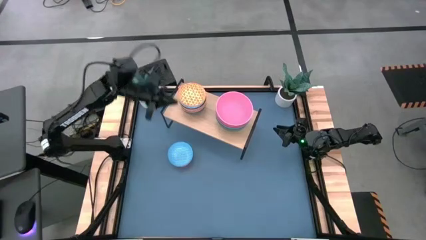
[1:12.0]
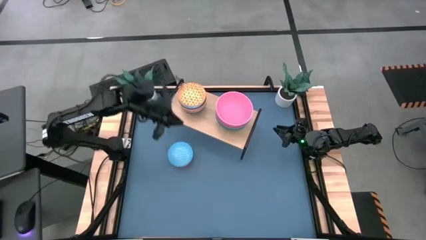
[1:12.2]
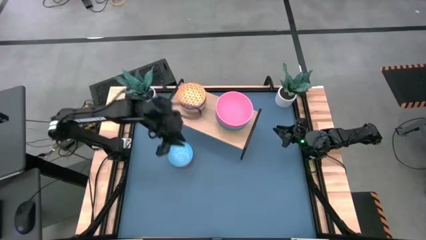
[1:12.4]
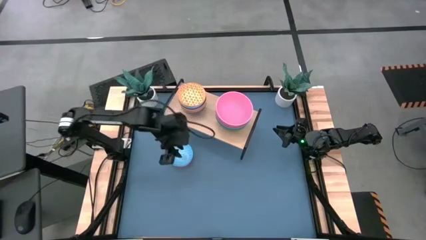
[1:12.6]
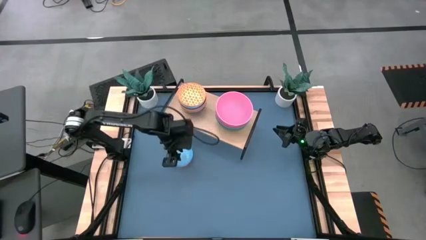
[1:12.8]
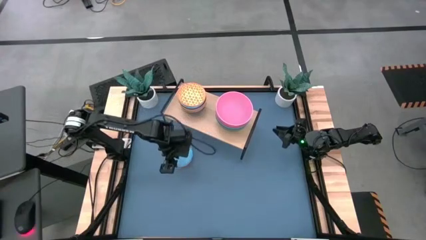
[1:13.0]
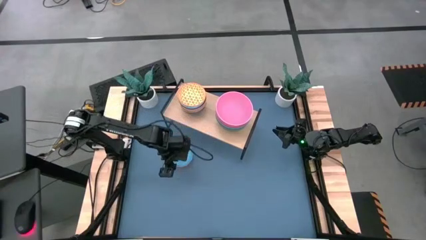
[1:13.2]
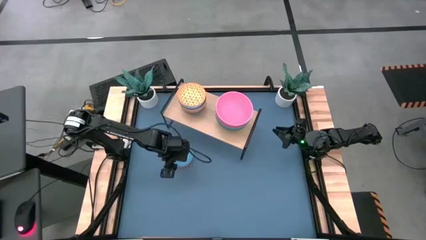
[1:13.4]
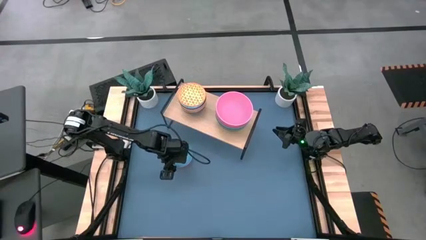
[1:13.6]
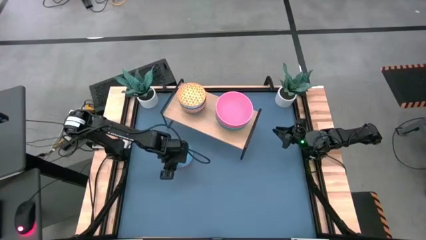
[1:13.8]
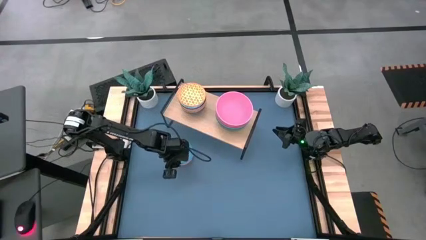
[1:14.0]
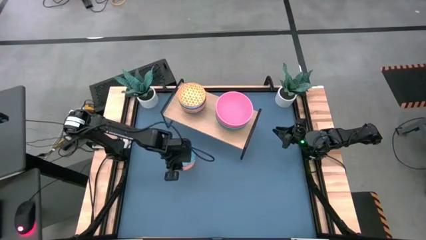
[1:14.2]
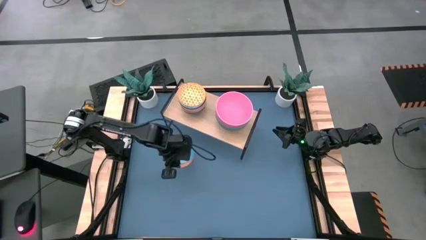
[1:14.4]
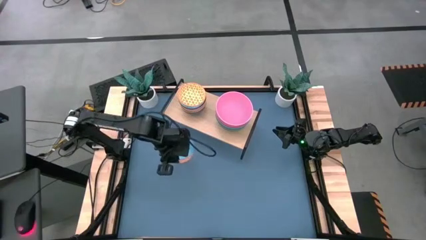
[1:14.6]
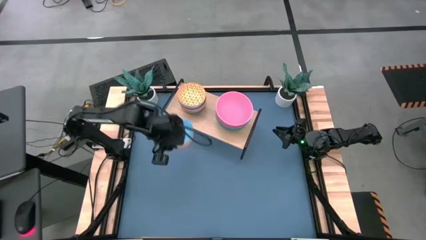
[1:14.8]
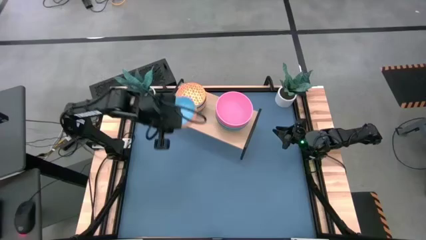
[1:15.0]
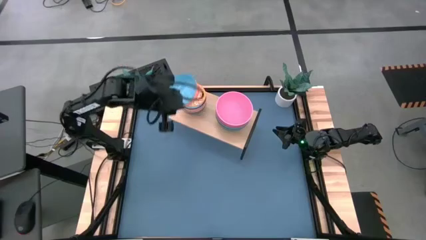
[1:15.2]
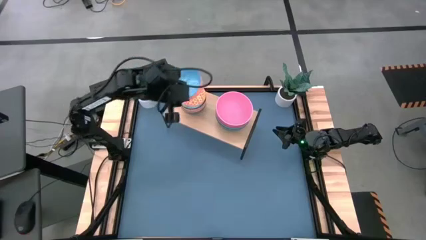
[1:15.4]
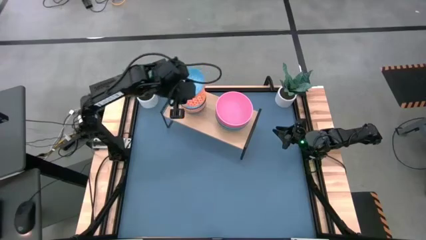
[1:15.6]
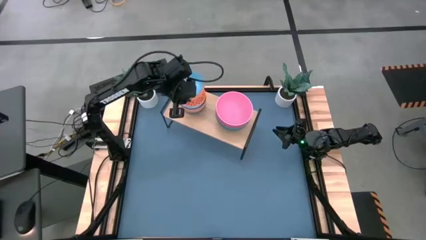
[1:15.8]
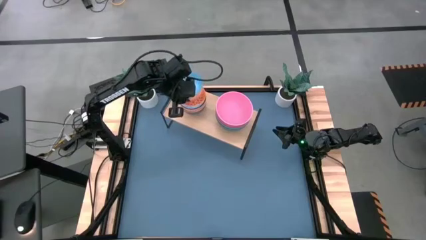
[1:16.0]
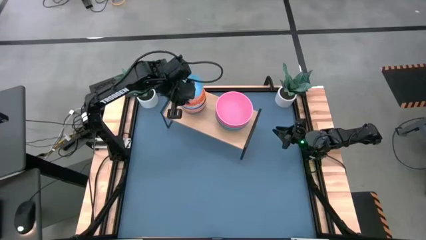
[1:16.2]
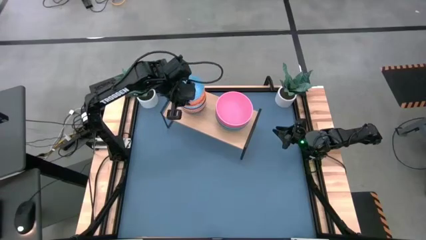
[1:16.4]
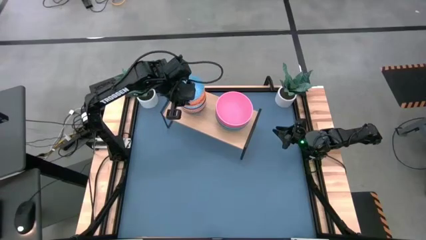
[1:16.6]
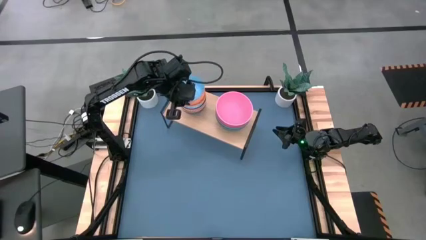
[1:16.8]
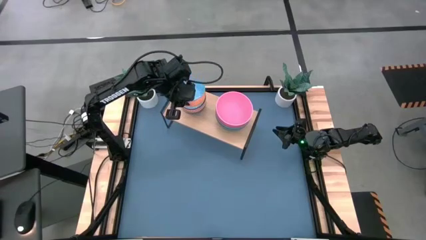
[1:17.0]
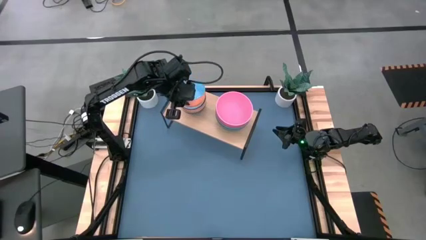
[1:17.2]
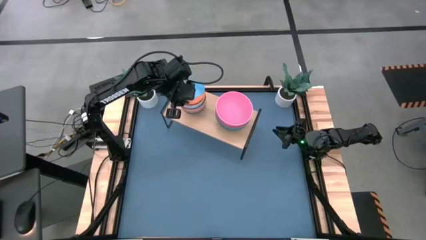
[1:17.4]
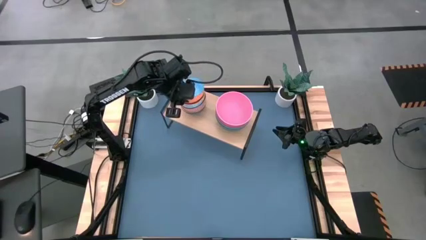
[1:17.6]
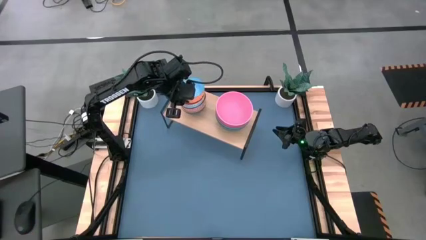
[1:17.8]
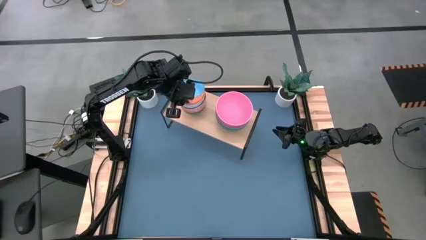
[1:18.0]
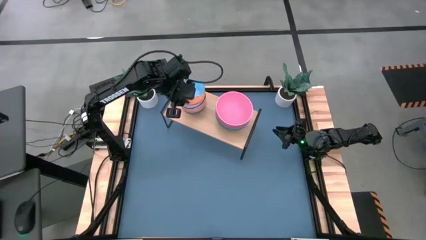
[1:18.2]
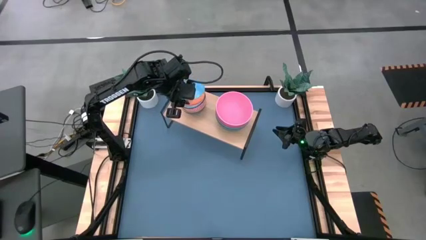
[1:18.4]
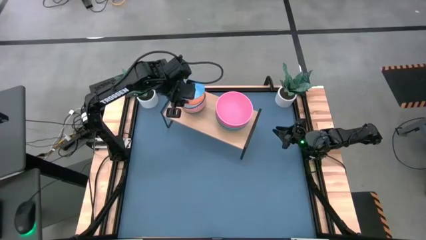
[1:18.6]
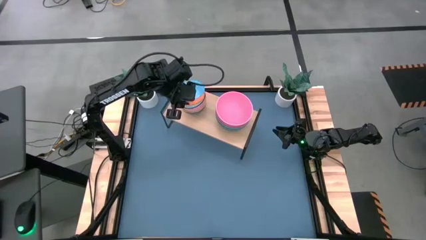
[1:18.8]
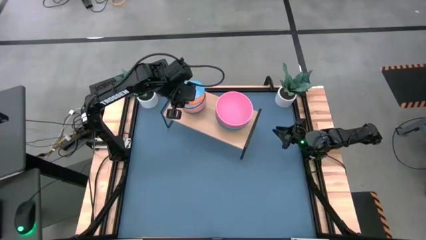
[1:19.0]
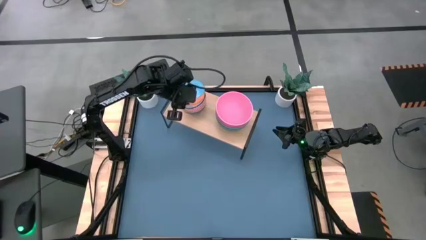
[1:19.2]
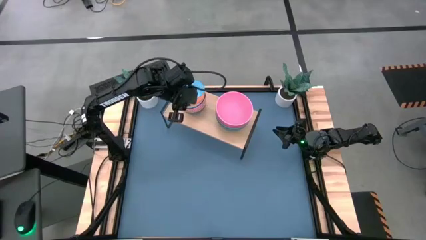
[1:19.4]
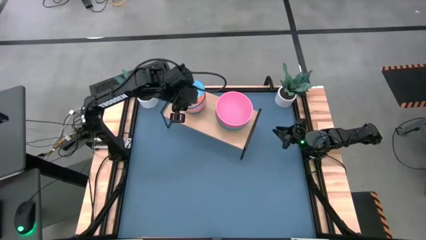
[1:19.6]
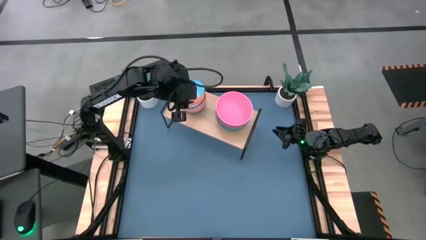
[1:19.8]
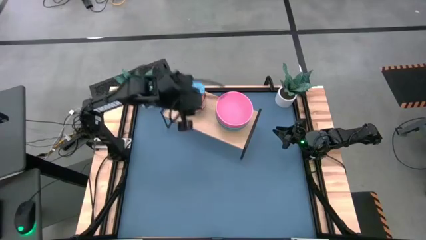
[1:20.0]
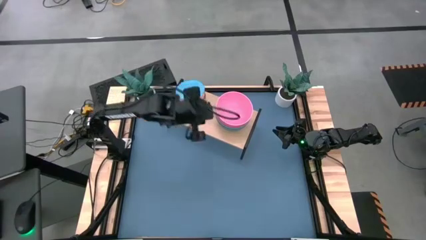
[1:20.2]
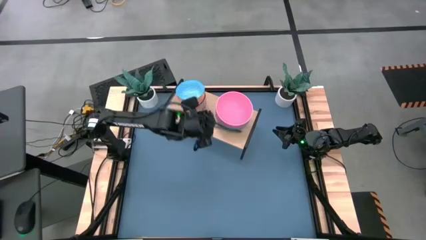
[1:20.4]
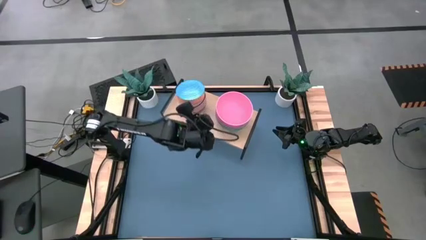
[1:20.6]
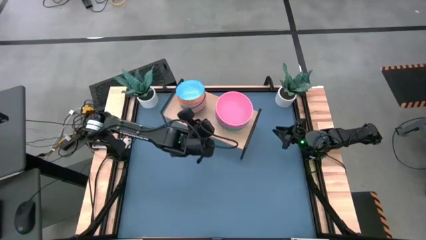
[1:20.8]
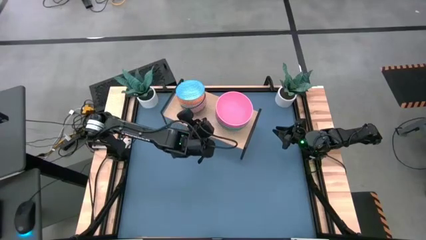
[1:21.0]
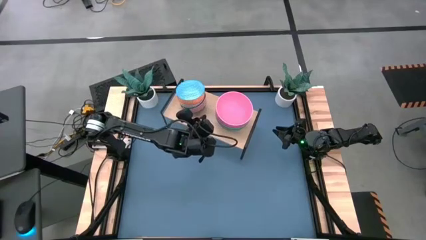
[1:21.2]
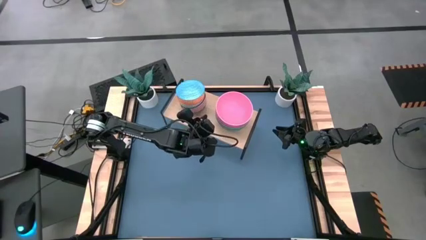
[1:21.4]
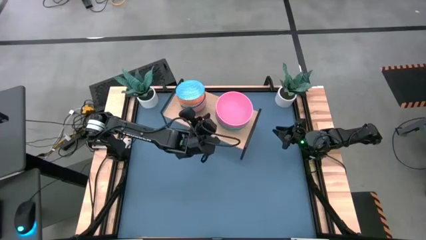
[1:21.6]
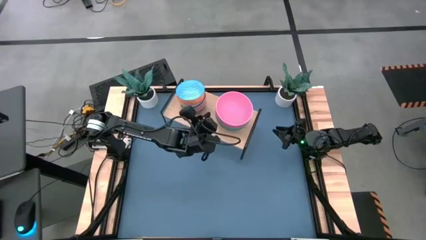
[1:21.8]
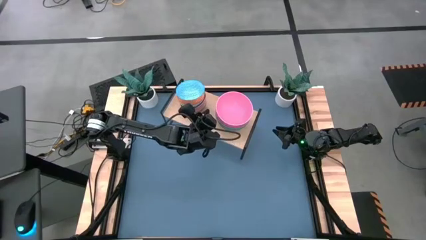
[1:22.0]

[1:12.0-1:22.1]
Task: Place and stack bowls onto a shelf
Stack the printed blue bowl on the printed orange bowl on the shelf
